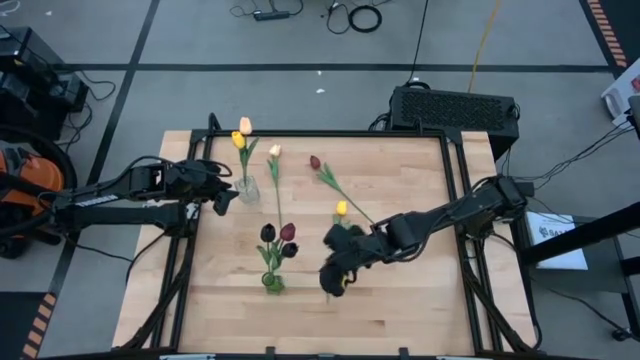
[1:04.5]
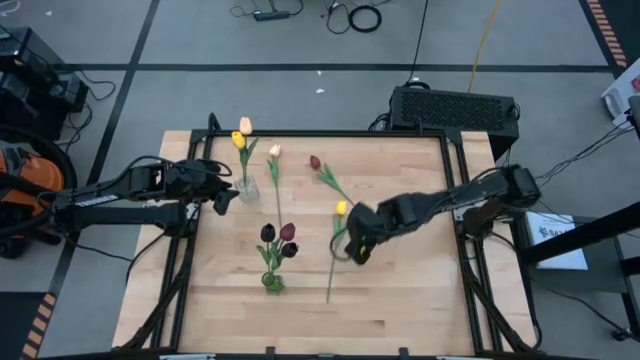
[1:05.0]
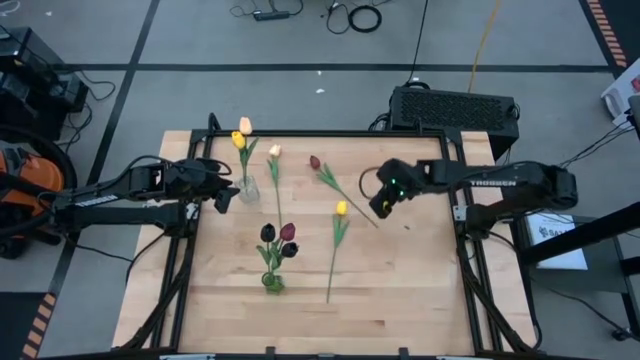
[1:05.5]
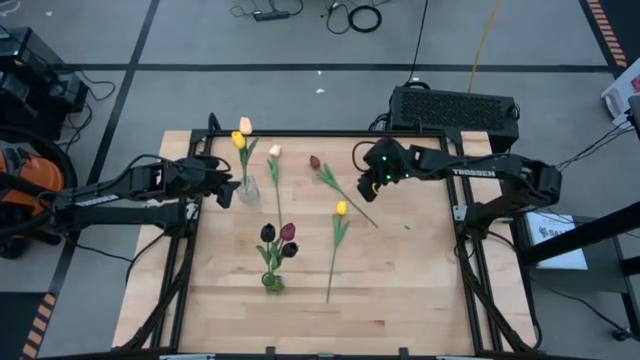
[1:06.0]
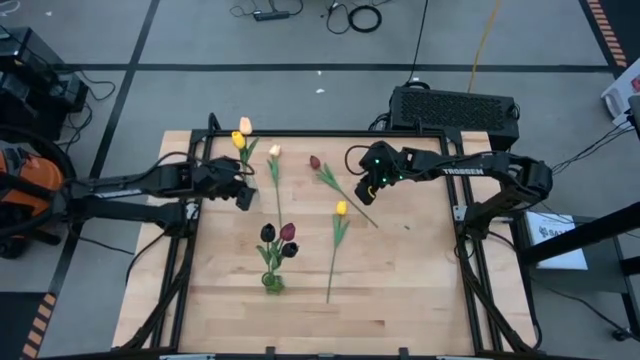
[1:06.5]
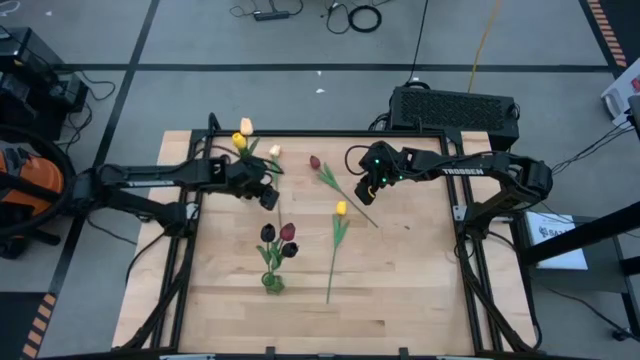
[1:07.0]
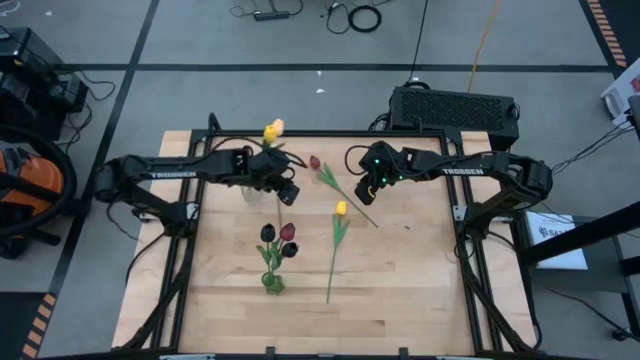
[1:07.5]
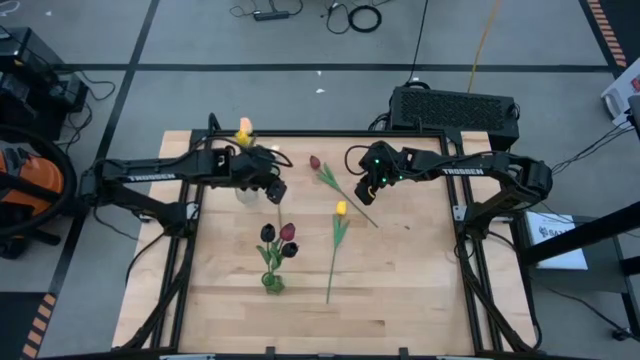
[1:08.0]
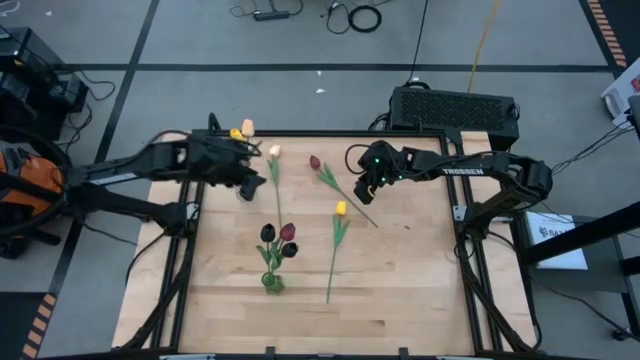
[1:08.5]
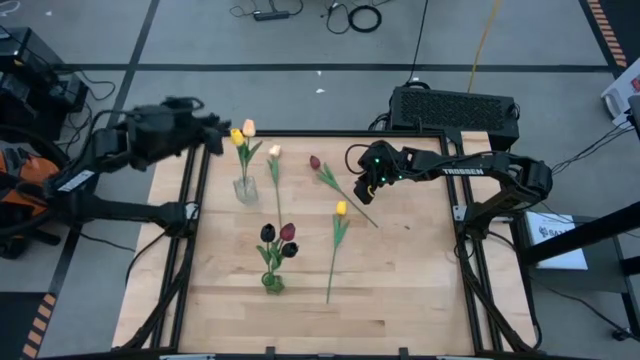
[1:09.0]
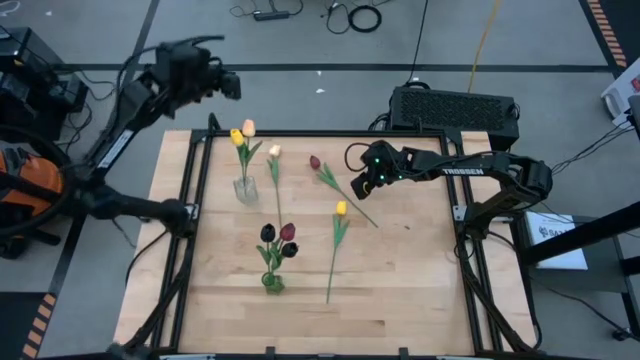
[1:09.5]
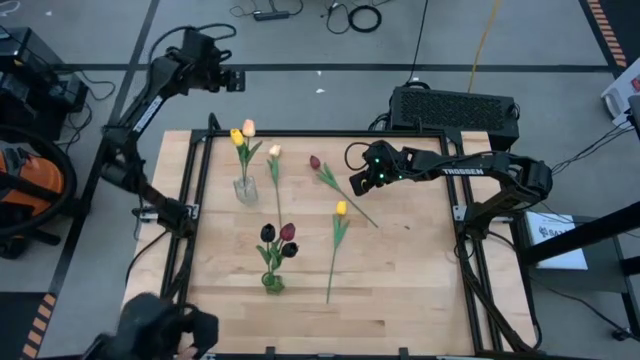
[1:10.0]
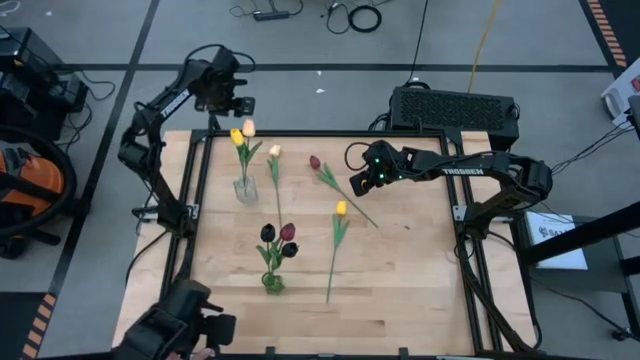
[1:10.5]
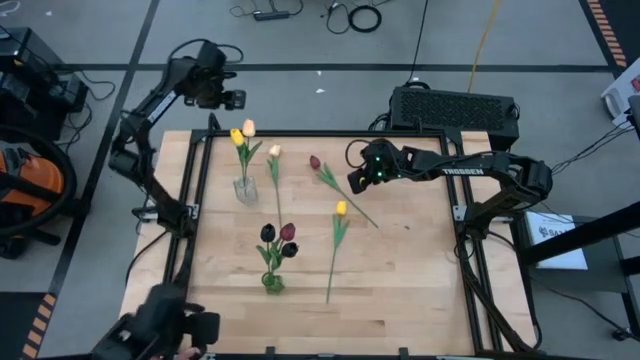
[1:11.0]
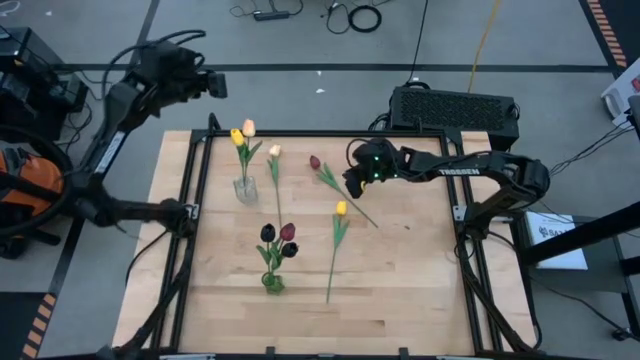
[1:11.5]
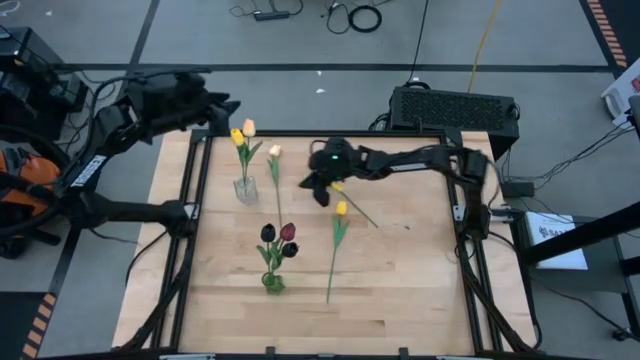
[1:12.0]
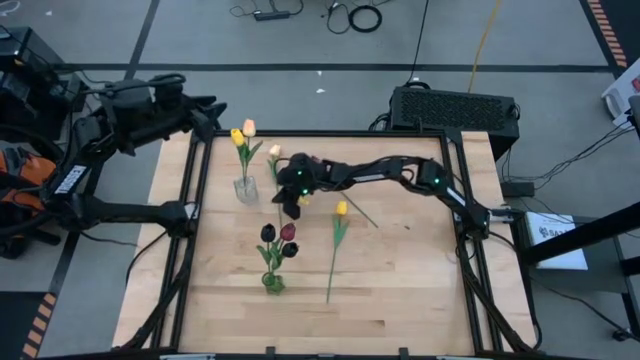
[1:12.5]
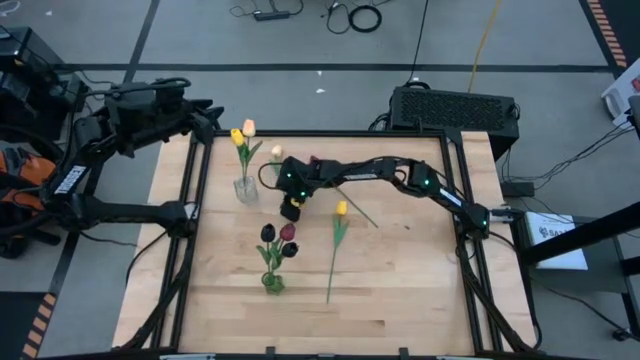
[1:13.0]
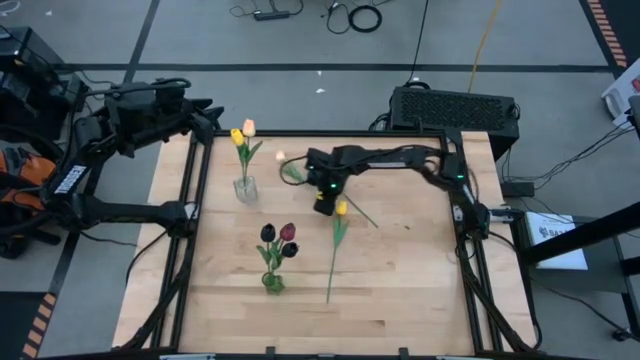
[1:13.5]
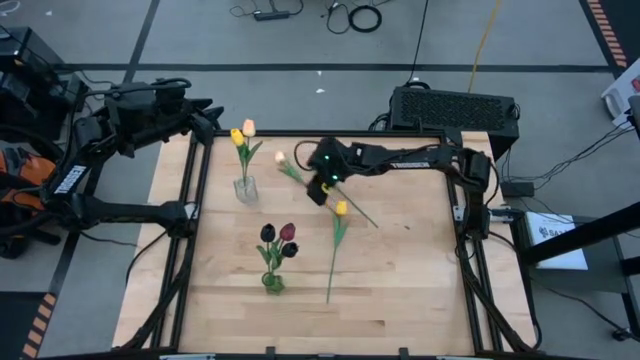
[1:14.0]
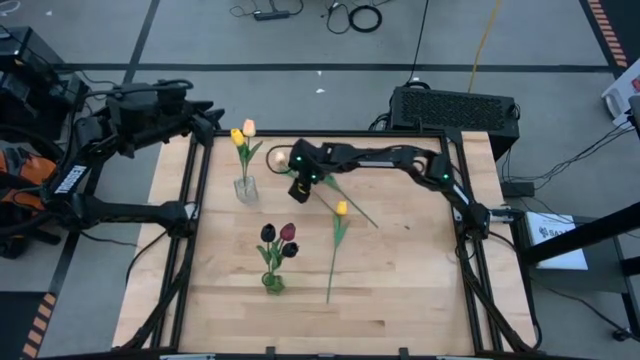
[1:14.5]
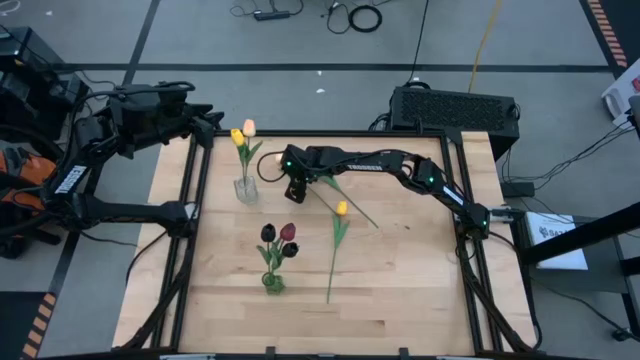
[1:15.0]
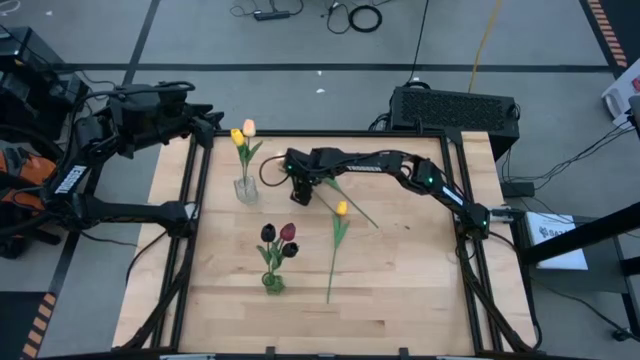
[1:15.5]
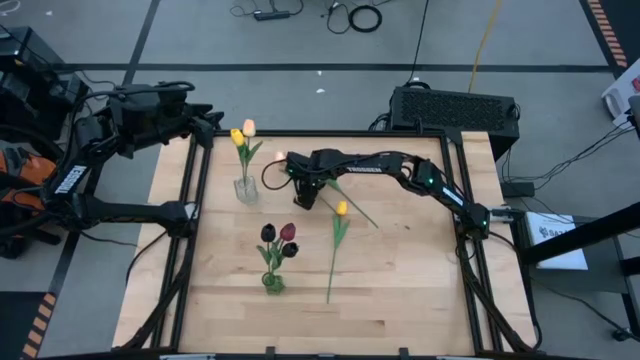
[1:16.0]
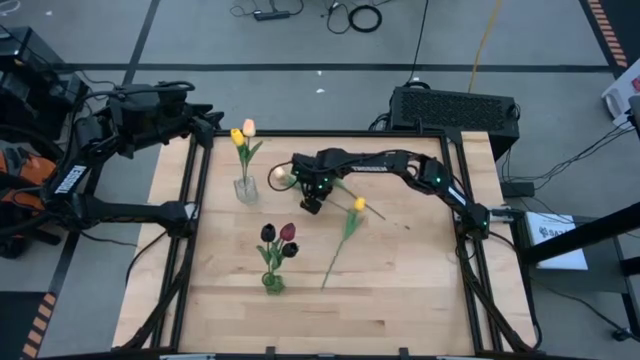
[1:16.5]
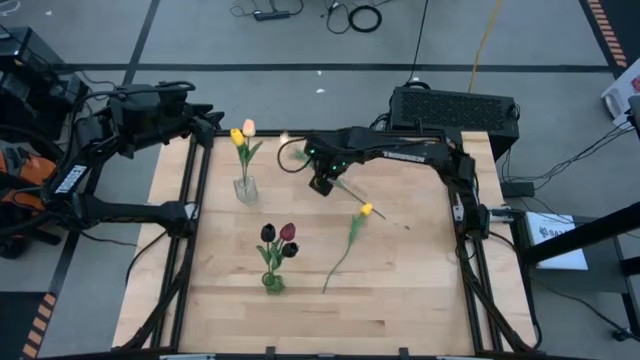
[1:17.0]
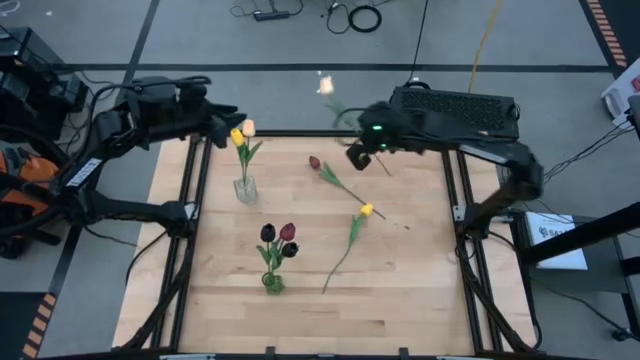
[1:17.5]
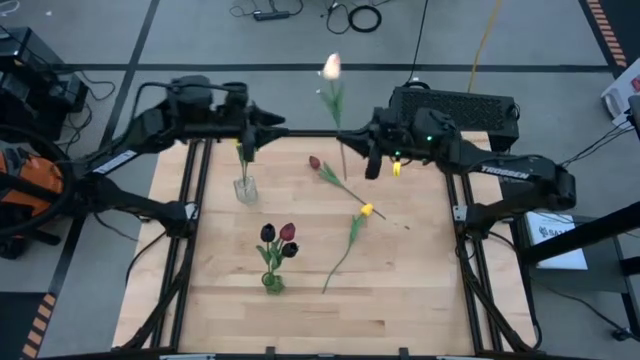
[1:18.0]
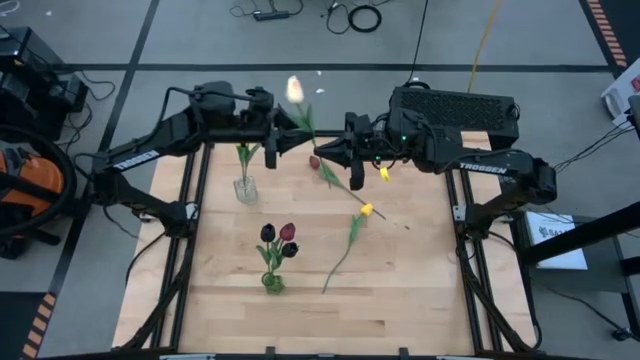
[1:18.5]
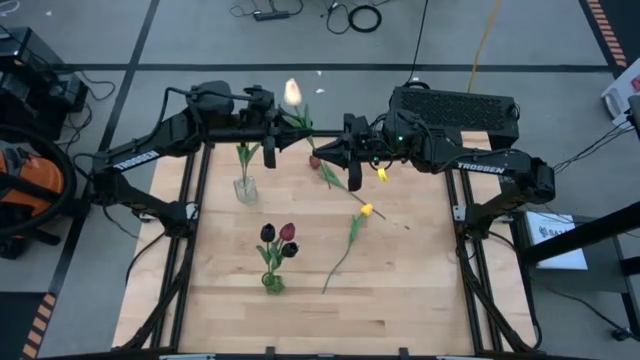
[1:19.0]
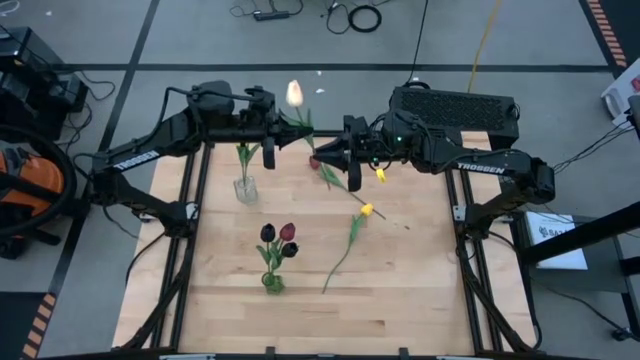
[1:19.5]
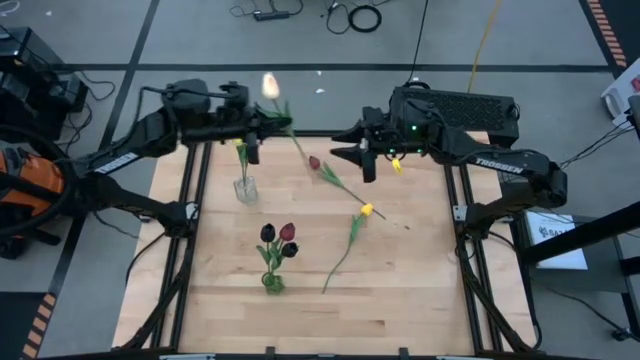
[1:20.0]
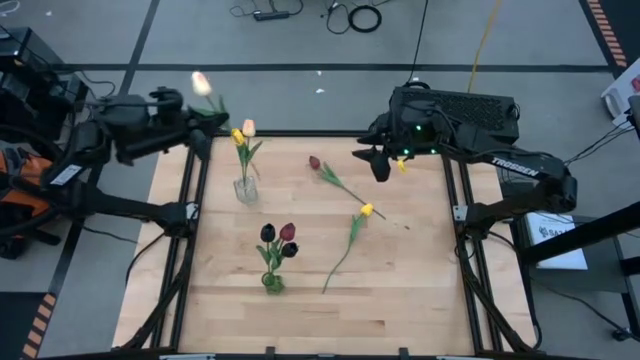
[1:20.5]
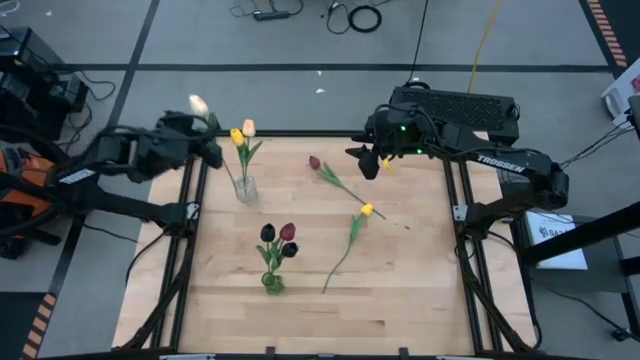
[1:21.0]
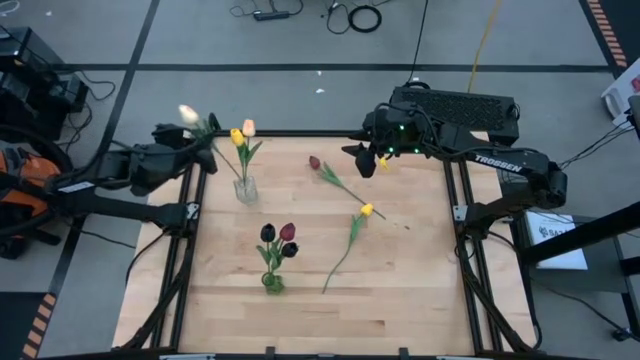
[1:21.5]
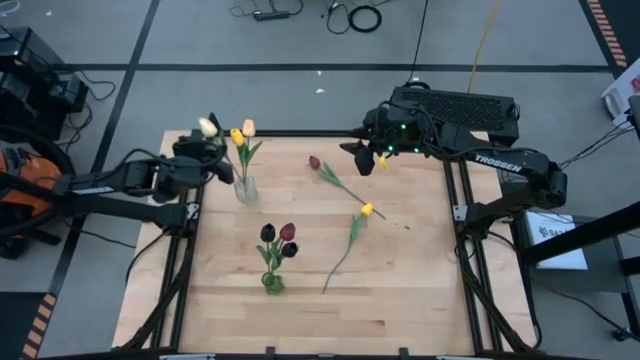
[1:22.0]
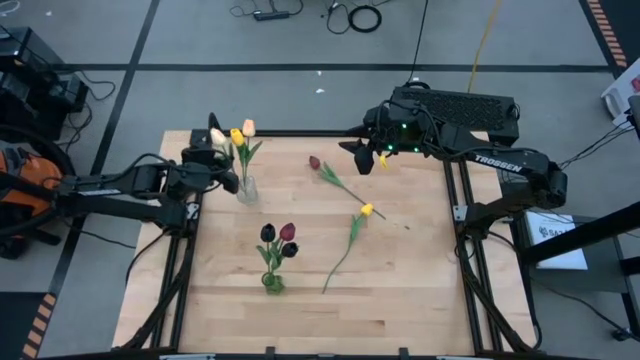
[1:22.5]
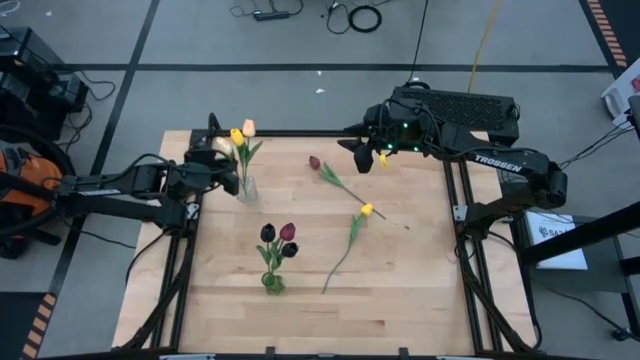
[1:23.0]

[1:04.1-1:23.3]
Task: Sort flowers into vase by color
Put the orange tulip into the transparent vase

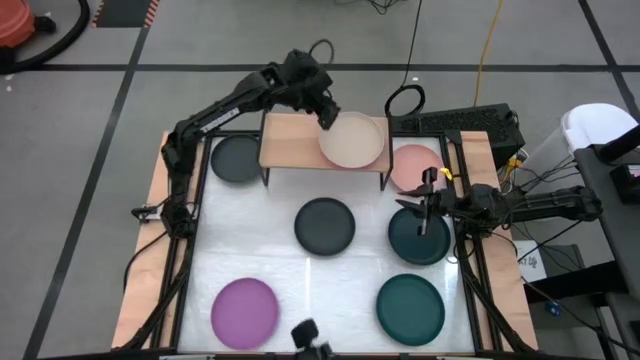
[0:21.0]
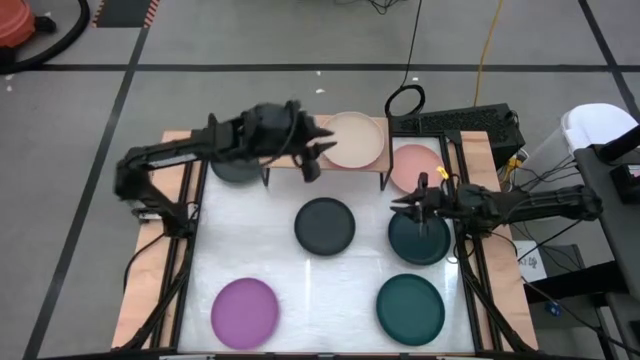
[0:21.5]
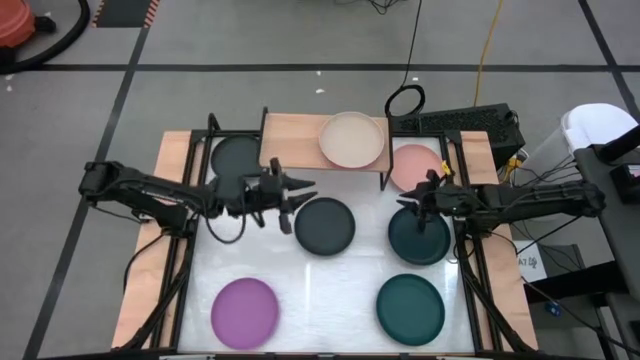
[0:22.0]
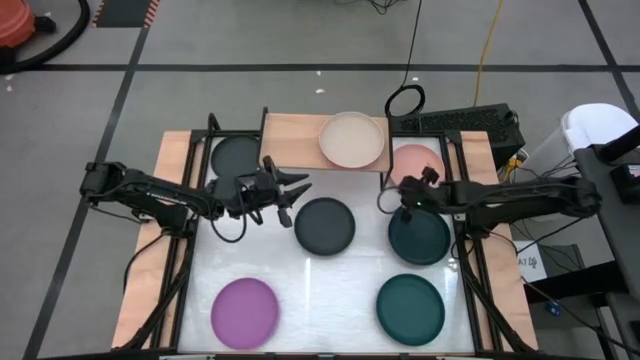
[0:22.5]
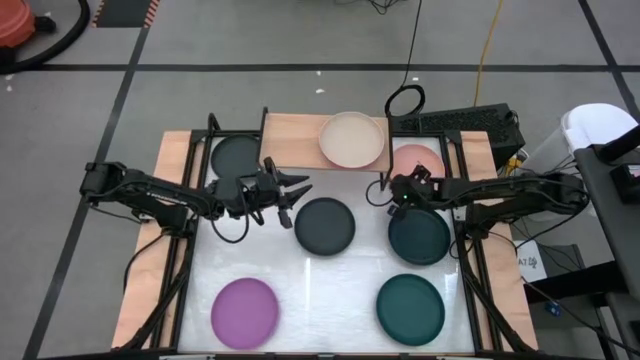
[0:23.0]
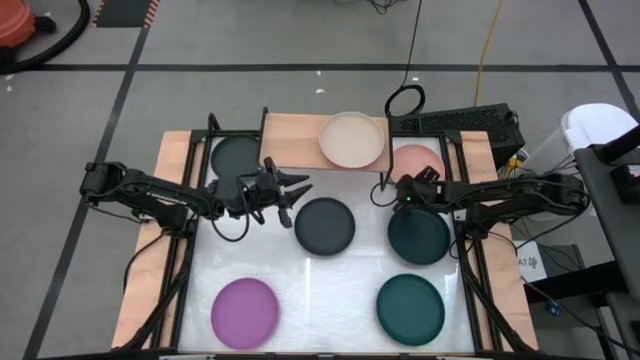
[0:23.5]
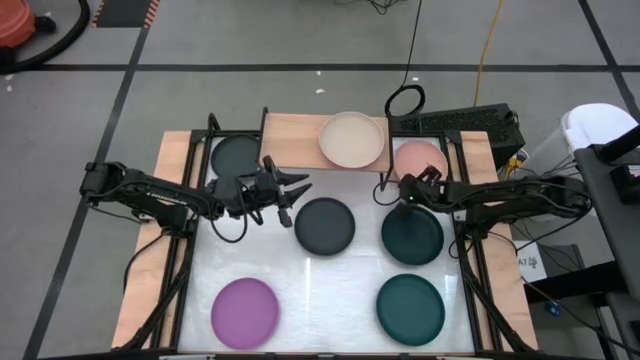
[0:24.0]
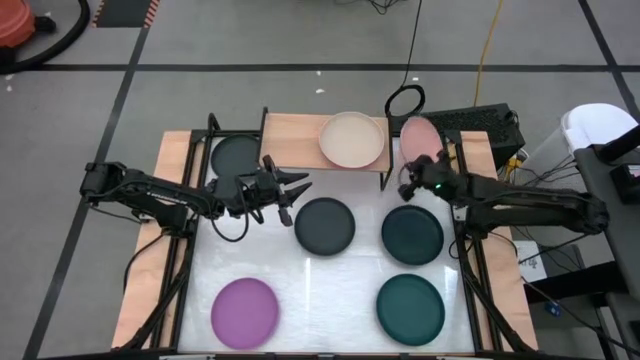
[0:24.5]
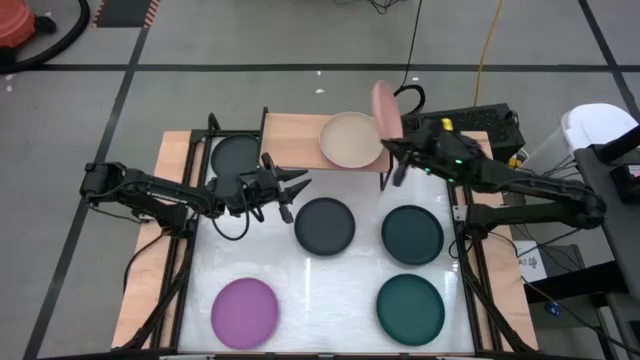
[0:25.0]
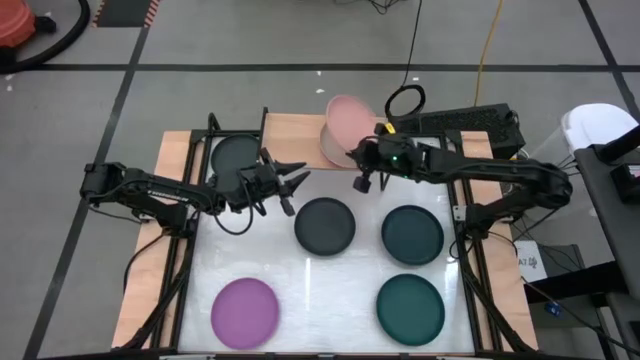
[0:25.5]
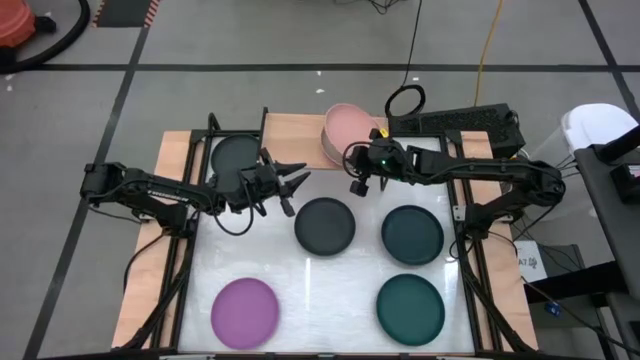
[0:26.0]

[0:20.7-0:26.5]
Task: Place and stack plates onto a shelf
Stack the light orange plate on top of the gray plate on the shelf
